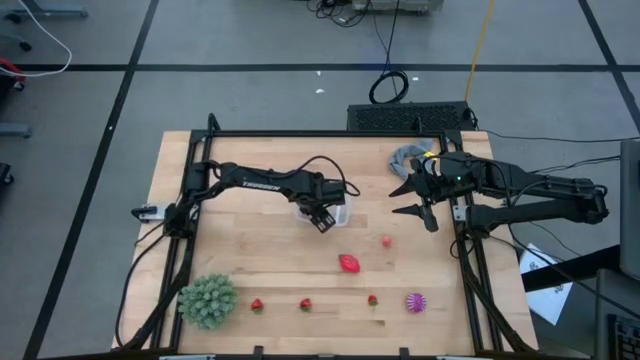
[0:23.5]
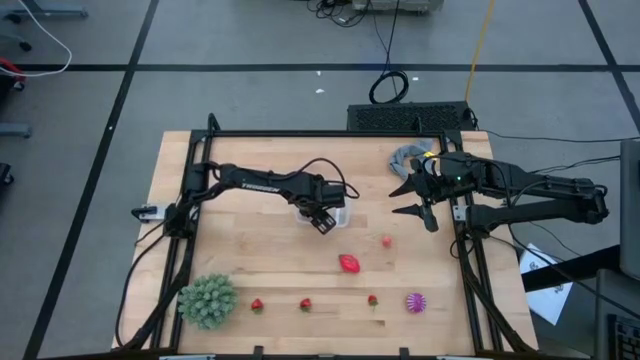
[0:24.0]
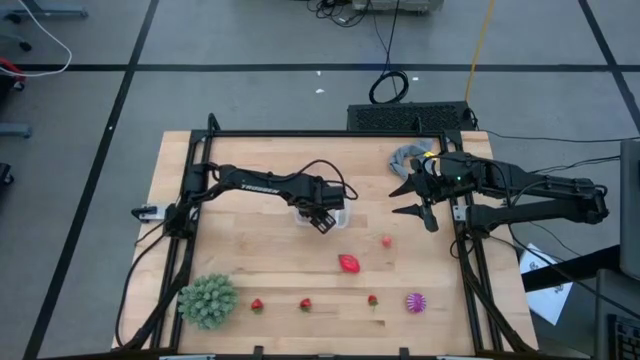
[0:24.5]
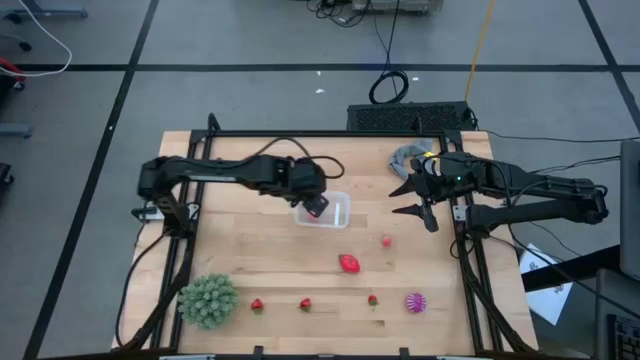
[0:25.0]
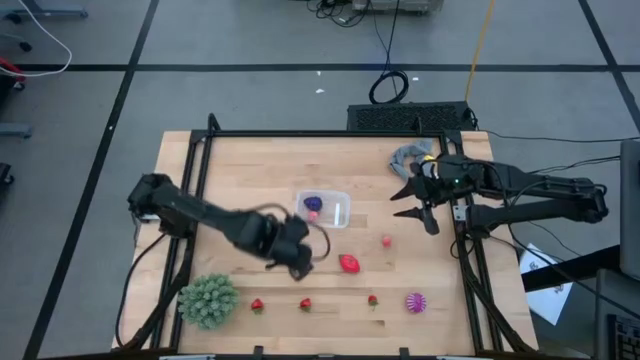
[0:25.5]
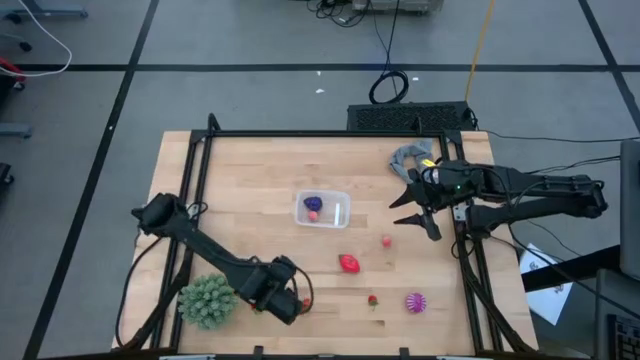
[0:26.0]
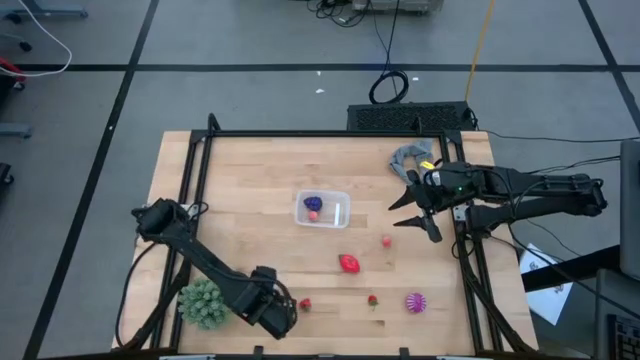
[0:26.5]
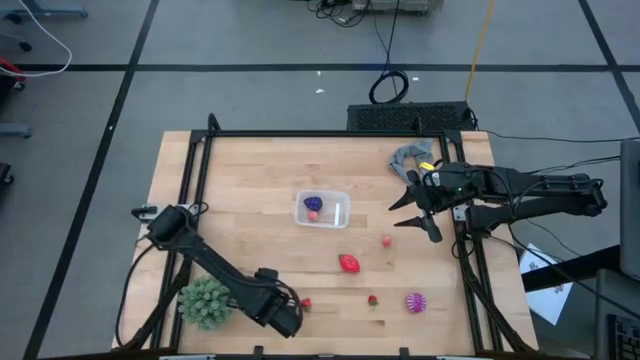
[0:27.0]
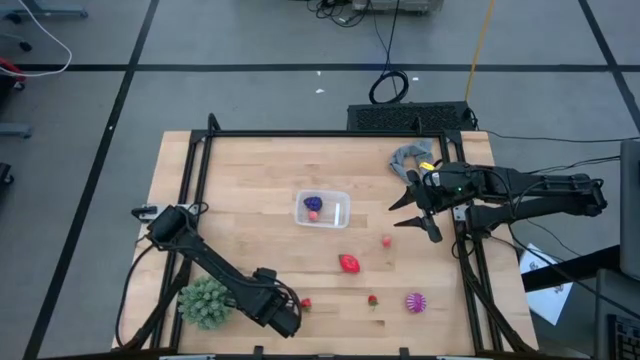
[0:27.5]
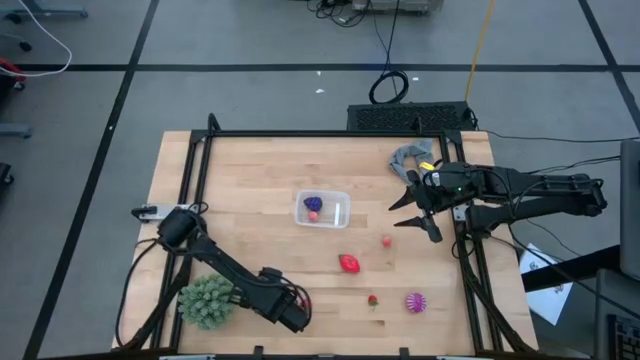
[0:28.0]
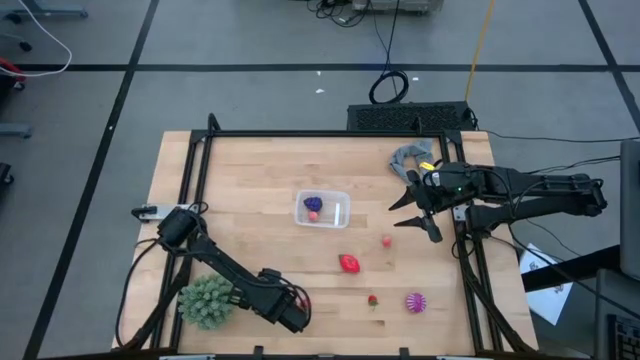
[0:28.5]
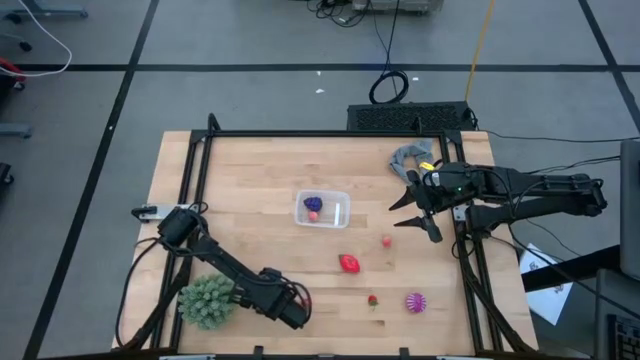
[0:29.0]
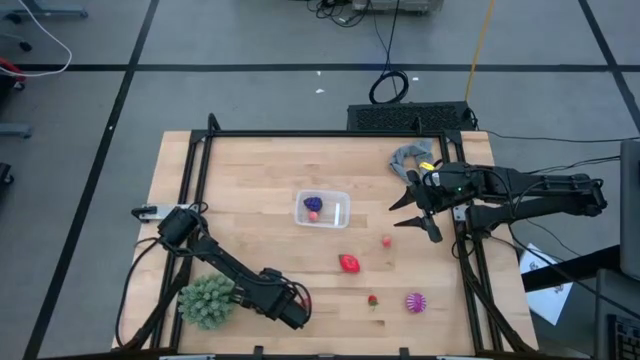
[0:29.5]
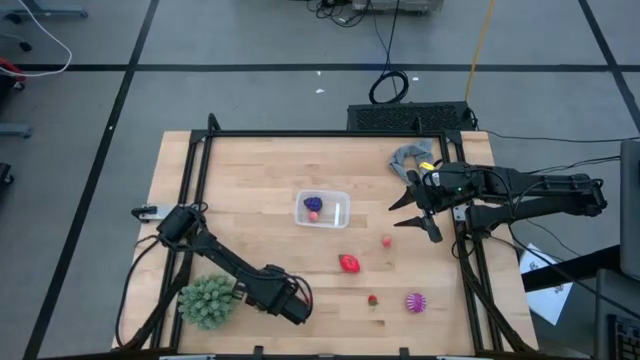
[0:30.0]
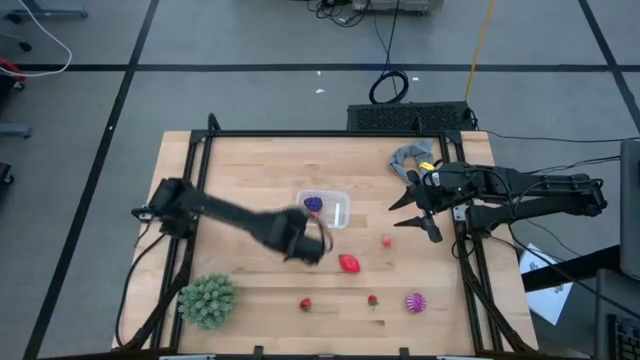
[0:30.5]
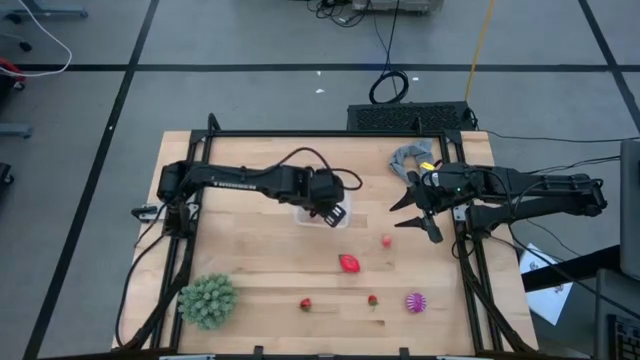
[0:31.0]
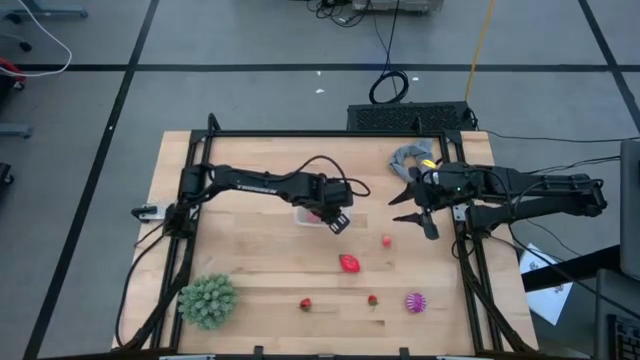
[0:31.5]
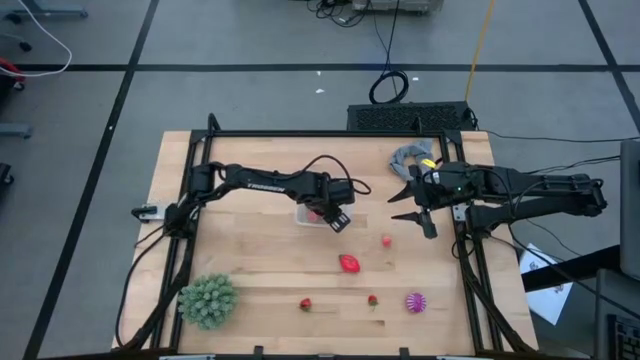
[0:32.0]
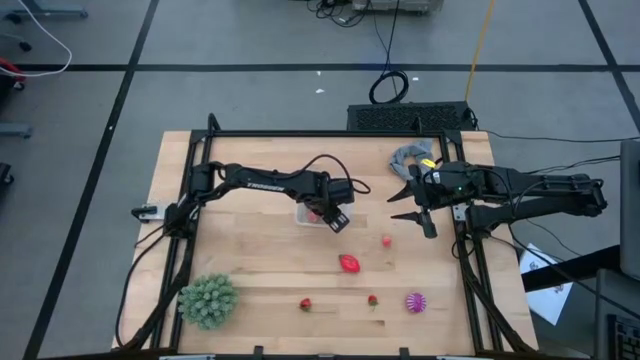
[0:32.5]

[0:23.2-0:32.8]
Task: Pick and placing Produce into tupperware
Put the left strawberry into the transparent bin

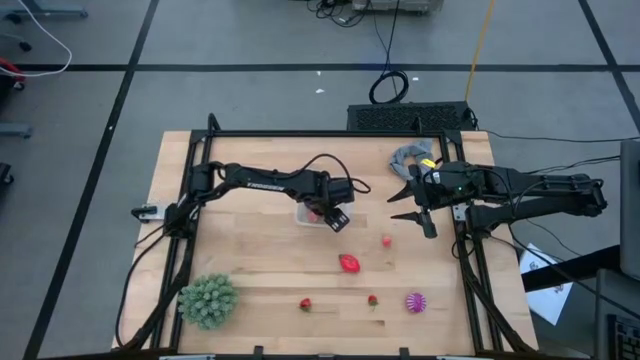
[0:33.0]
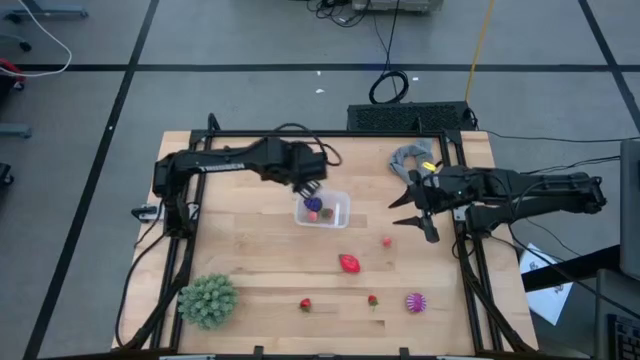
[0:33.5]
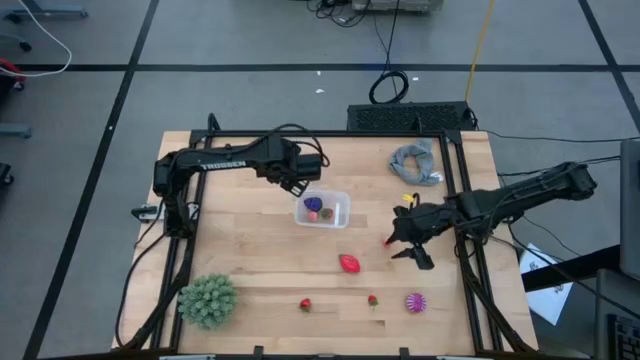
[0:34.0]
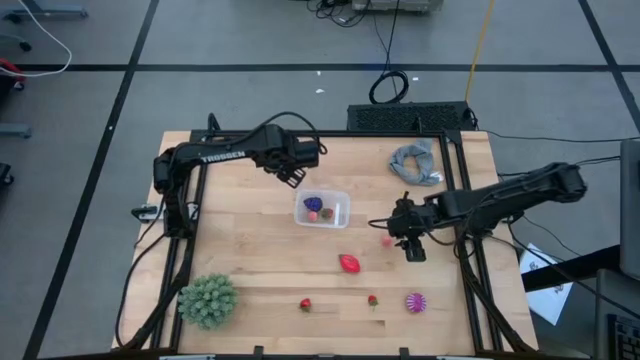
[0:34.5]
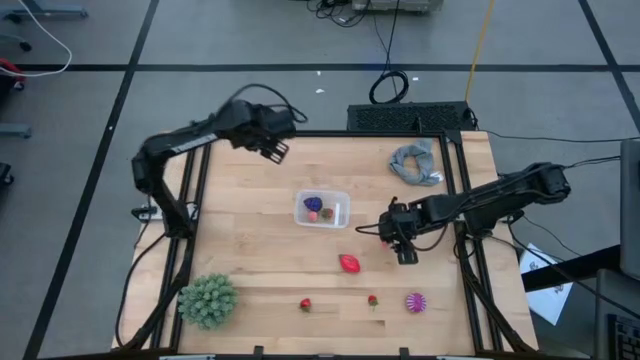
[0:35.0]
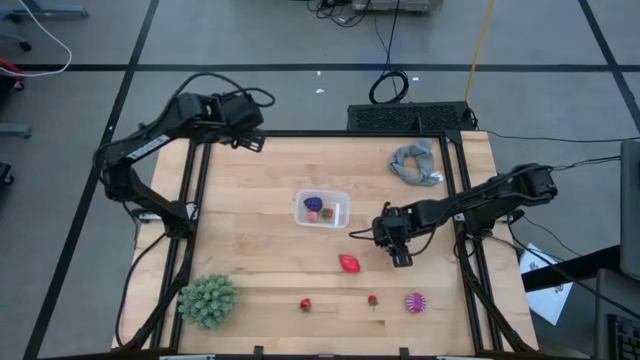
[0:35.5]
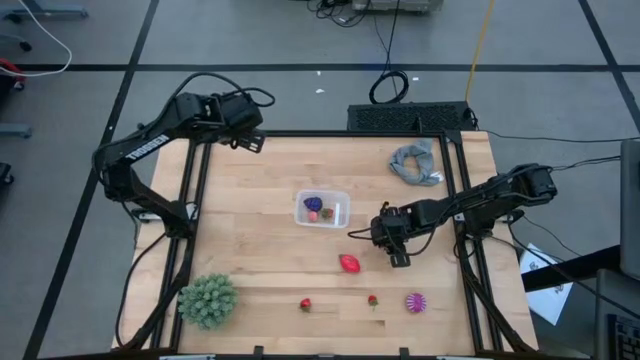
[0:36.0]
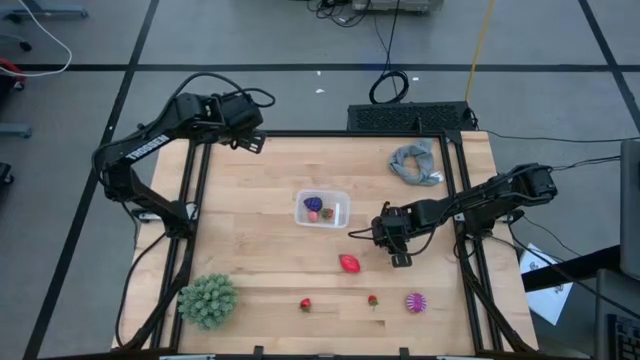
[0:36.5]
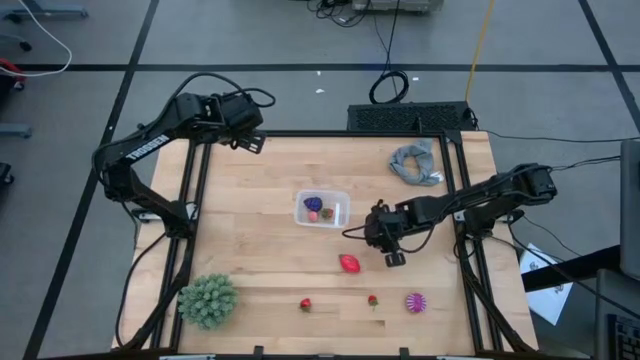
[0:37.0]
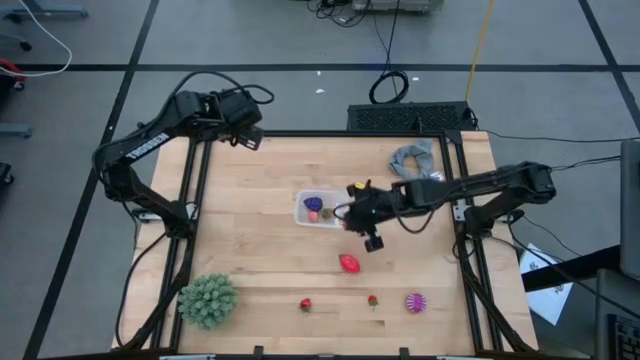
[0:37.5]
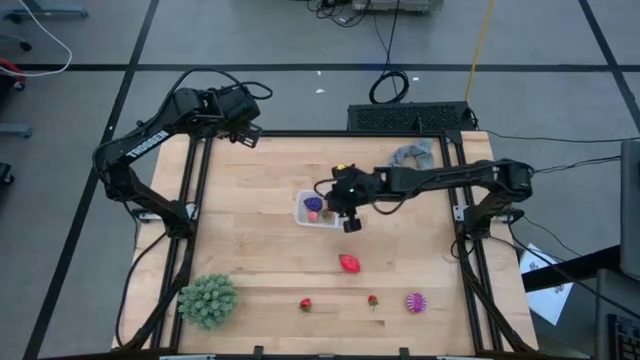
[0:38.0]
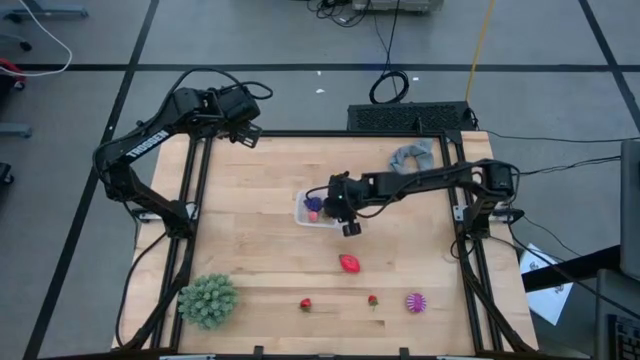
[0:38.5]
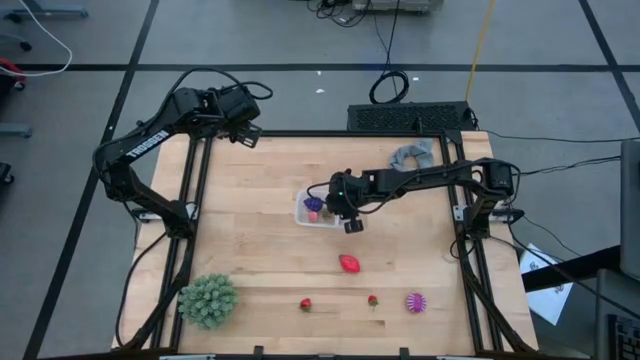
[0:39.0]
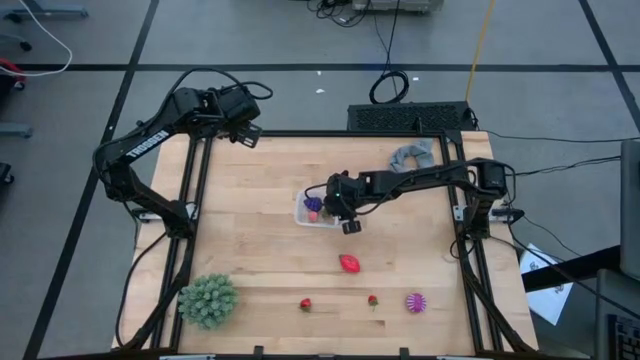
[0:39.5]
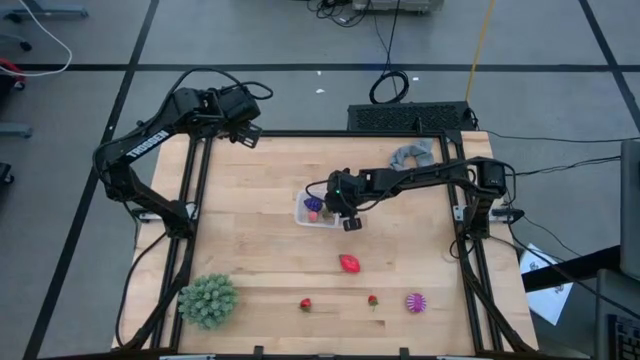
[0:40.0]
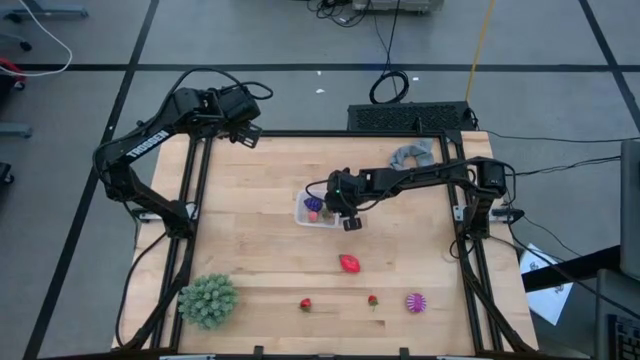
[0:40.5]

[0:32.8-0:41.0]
Put the apricot into the transparent bin

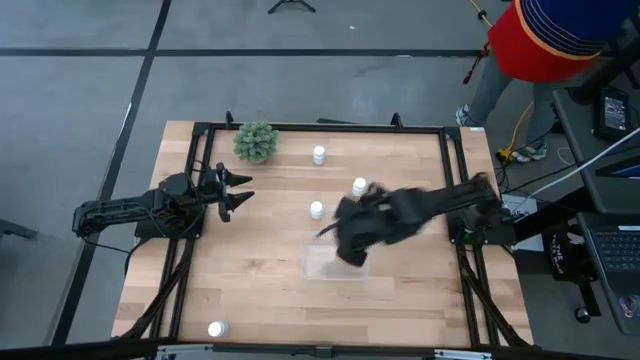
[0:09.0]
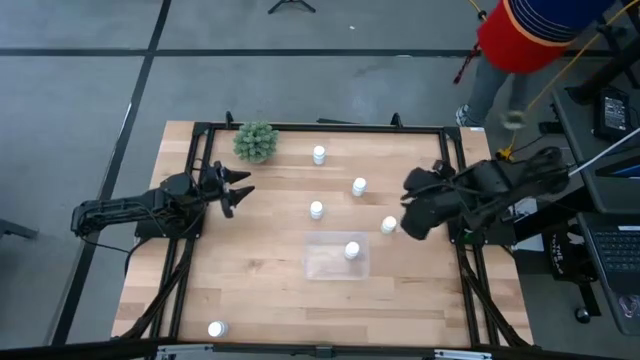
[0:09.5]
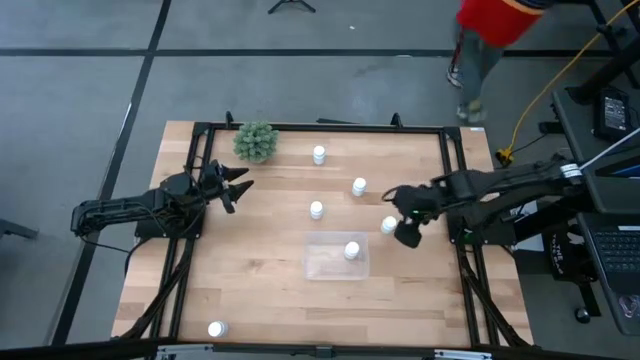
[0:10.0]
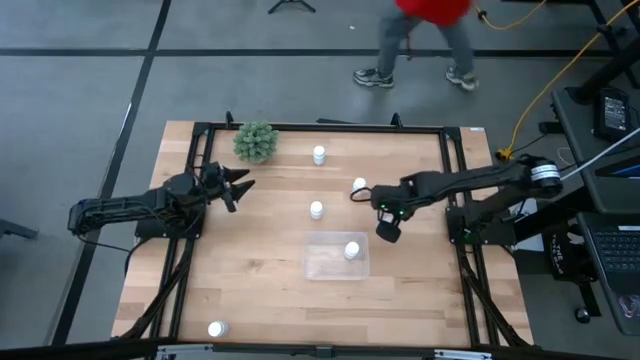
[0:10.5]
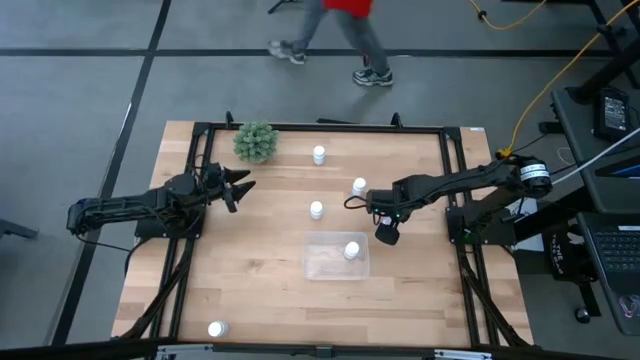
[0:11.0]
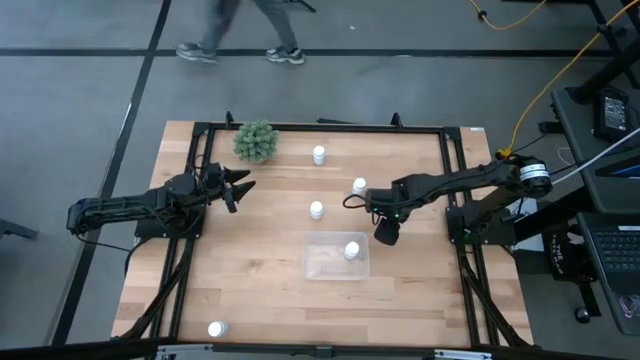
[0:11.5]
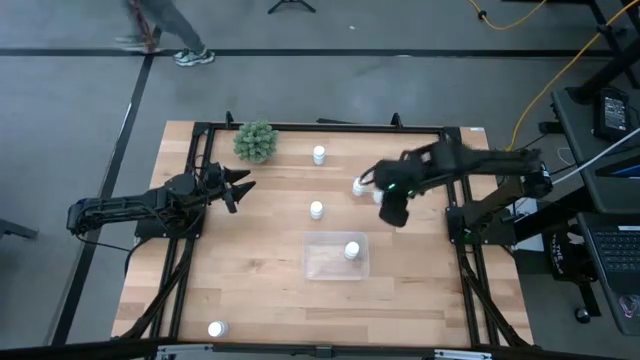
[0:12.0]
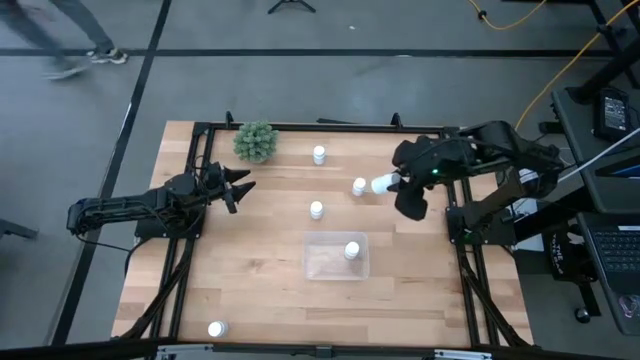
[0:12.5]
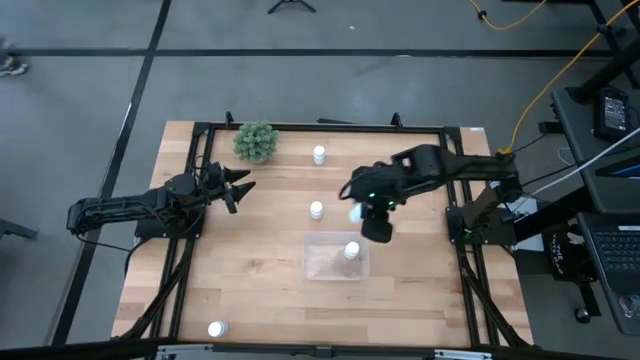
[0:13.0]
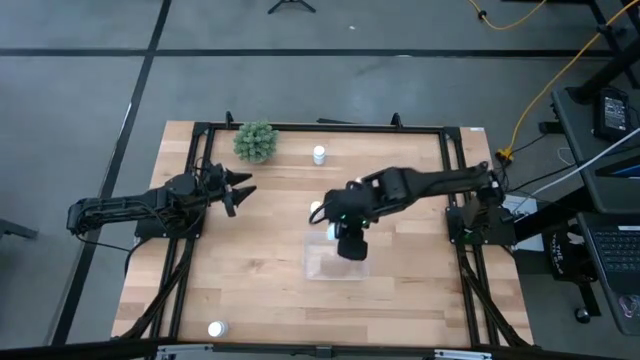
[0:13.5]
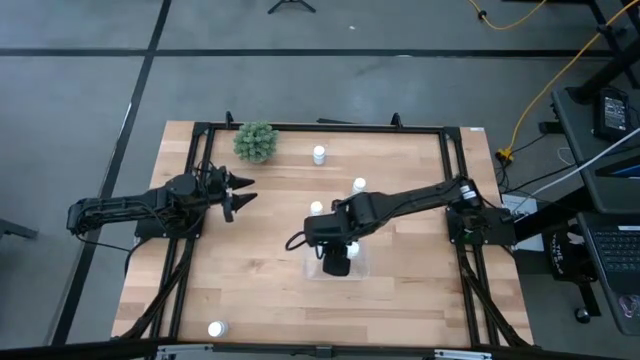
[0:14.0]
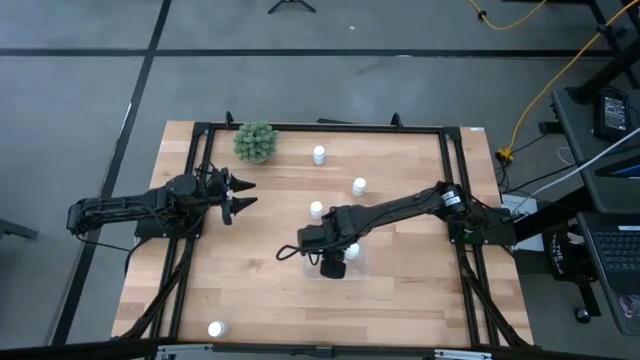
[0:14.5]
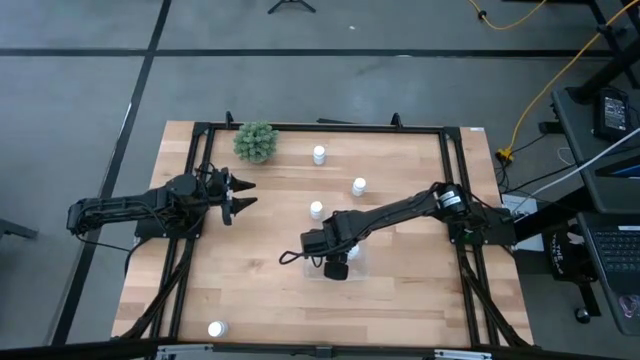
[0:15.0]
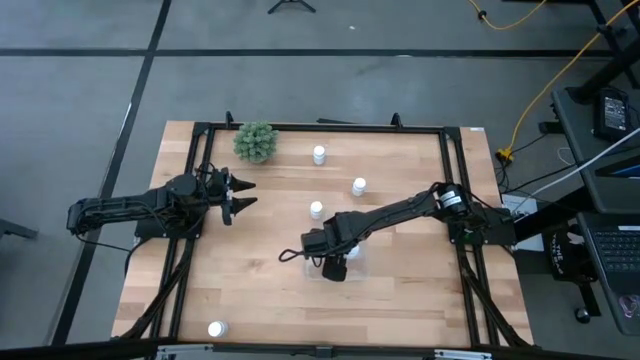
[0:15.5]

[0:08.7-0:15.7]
Task: Pick and place pill bottles into a basket
Put the white medicine bottle into the transparent bin
